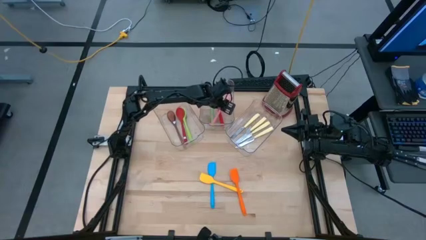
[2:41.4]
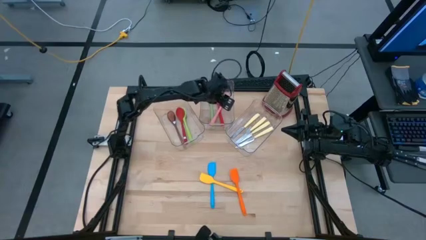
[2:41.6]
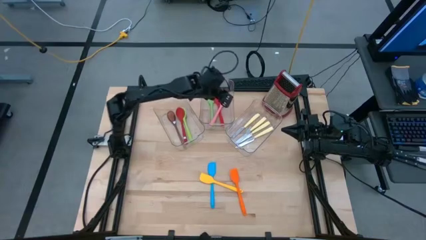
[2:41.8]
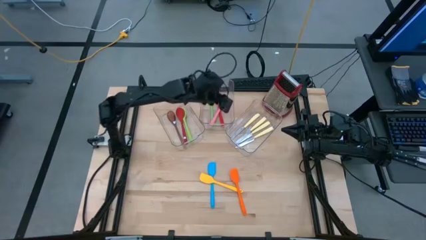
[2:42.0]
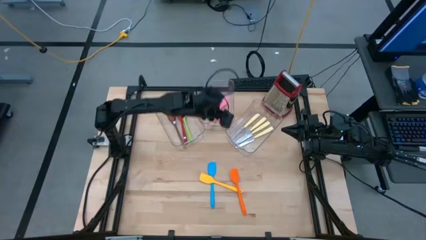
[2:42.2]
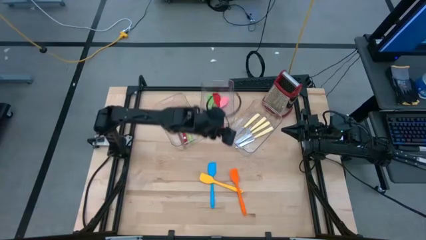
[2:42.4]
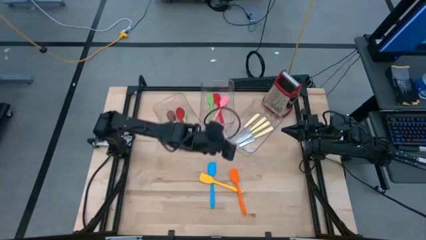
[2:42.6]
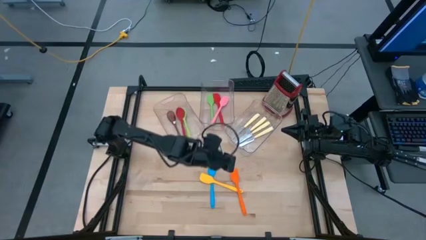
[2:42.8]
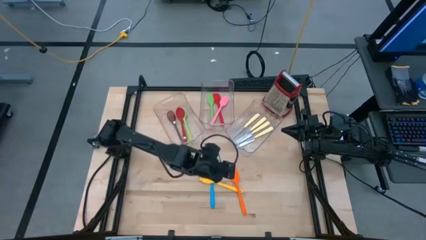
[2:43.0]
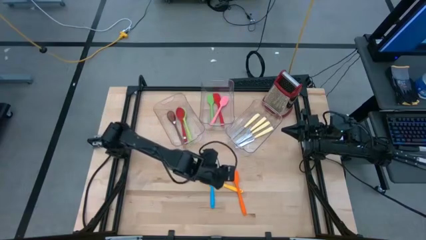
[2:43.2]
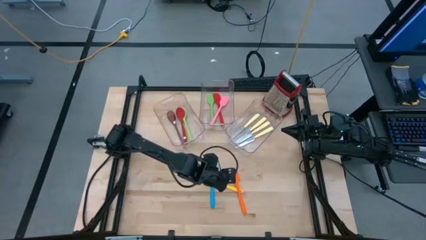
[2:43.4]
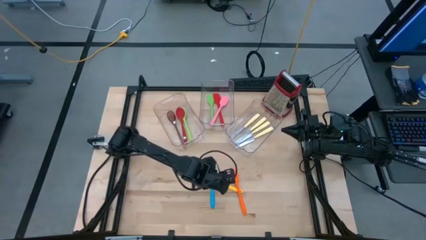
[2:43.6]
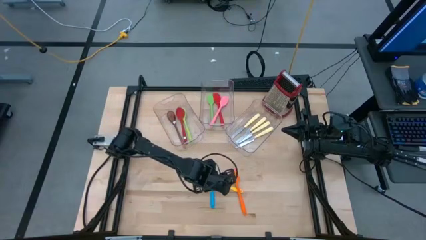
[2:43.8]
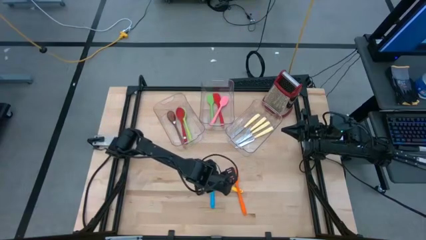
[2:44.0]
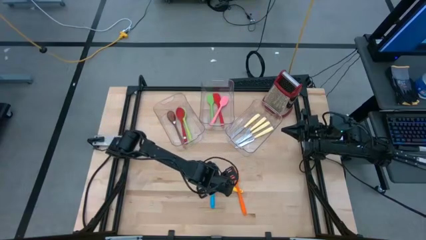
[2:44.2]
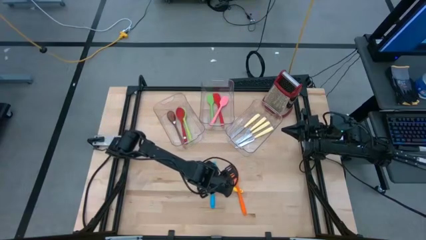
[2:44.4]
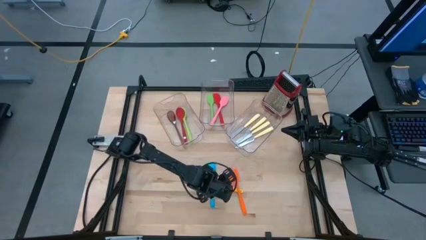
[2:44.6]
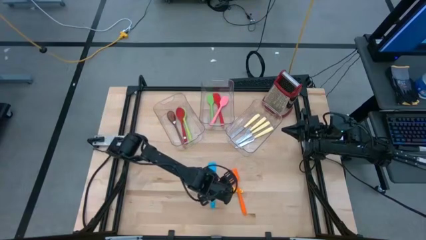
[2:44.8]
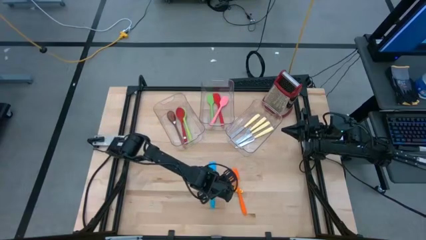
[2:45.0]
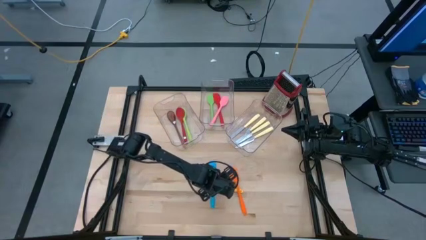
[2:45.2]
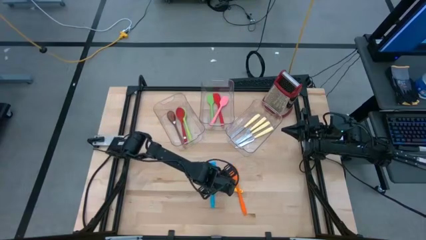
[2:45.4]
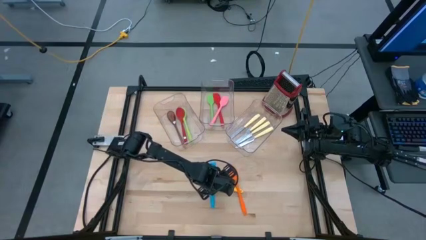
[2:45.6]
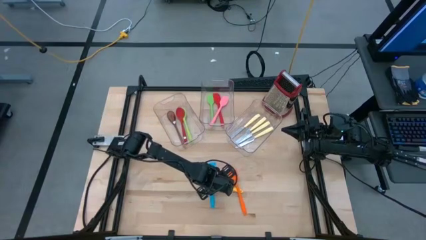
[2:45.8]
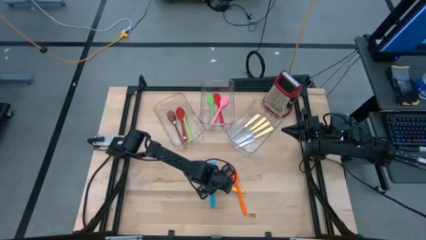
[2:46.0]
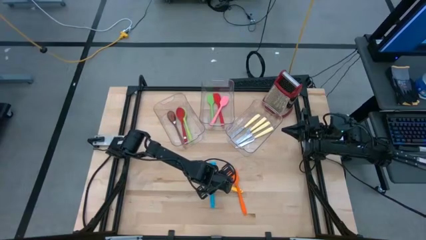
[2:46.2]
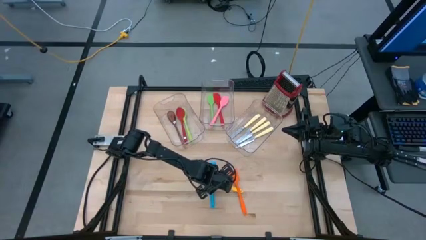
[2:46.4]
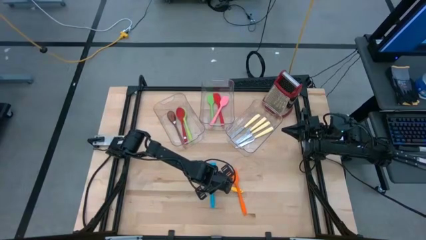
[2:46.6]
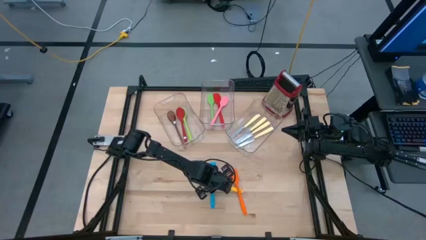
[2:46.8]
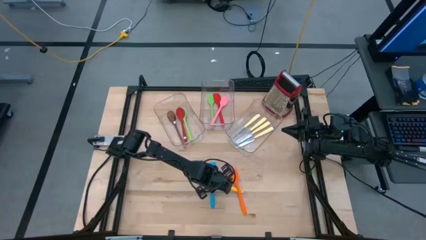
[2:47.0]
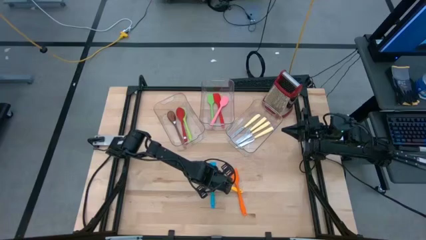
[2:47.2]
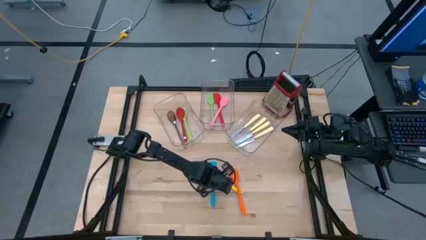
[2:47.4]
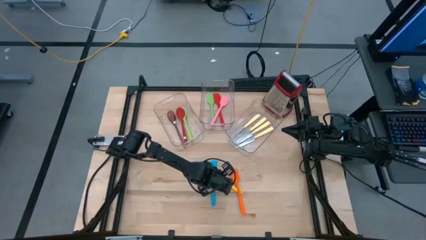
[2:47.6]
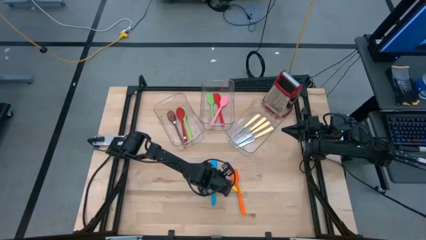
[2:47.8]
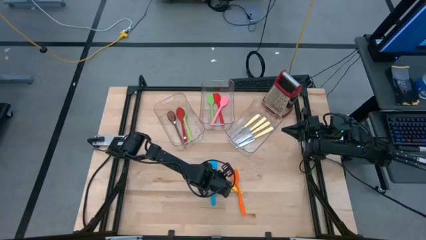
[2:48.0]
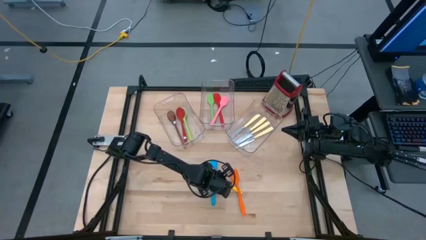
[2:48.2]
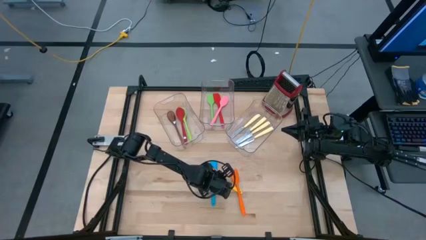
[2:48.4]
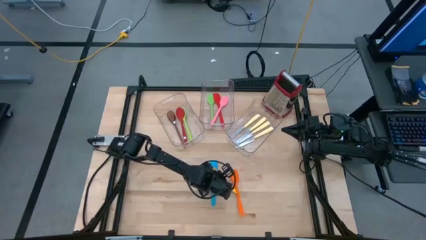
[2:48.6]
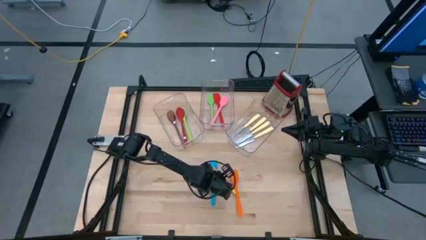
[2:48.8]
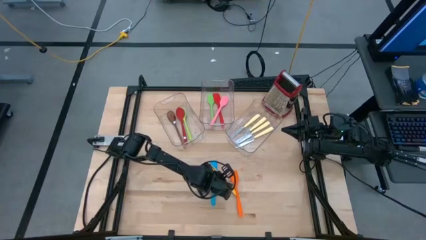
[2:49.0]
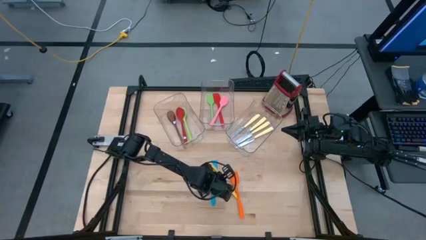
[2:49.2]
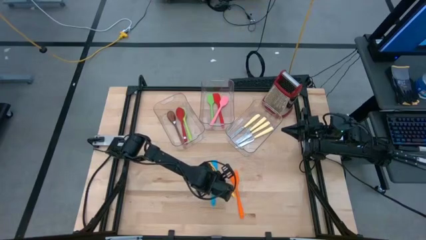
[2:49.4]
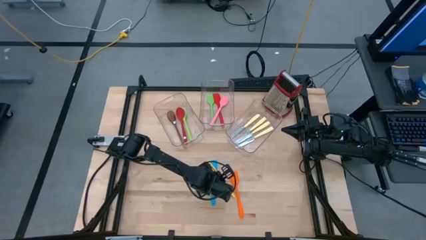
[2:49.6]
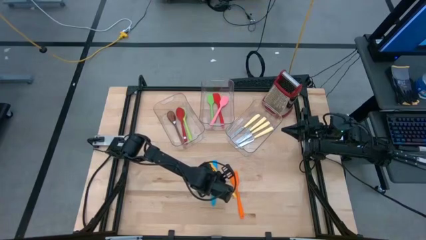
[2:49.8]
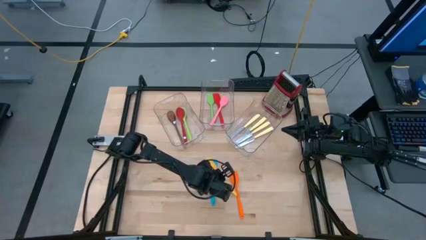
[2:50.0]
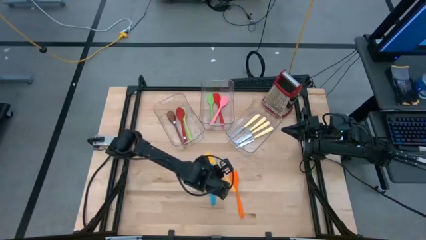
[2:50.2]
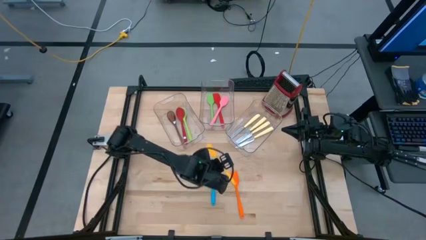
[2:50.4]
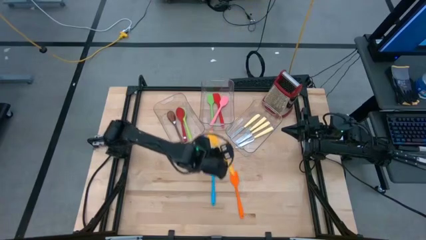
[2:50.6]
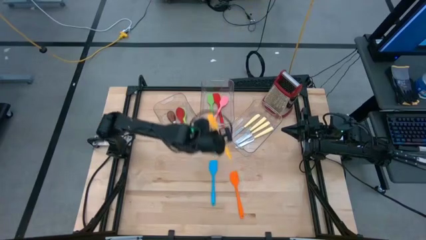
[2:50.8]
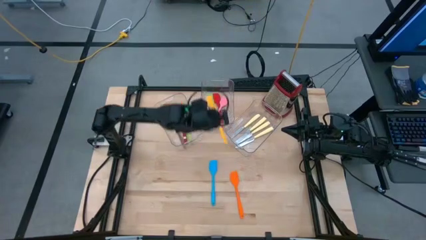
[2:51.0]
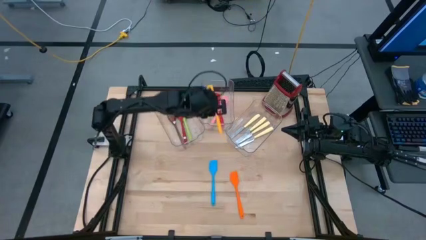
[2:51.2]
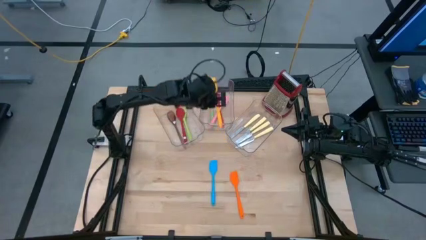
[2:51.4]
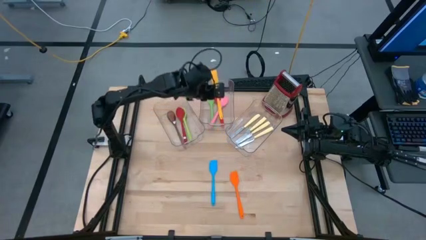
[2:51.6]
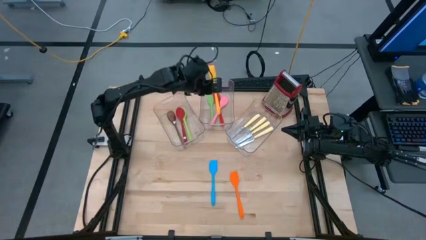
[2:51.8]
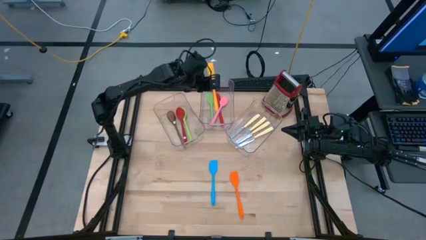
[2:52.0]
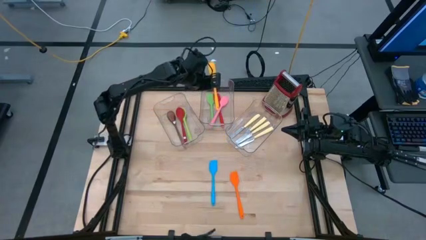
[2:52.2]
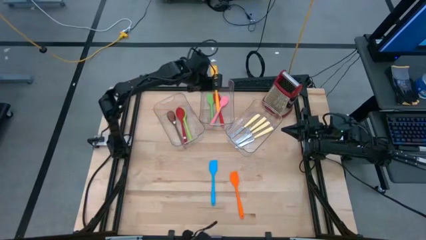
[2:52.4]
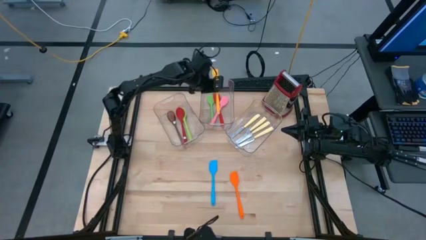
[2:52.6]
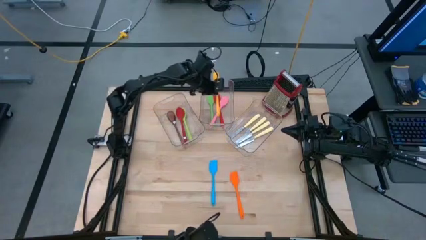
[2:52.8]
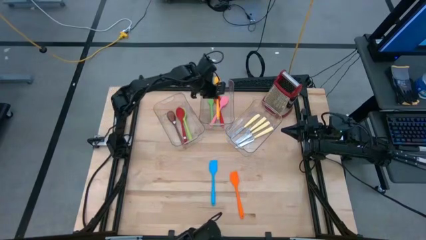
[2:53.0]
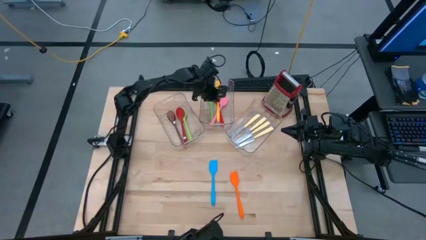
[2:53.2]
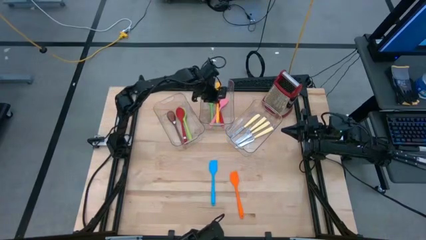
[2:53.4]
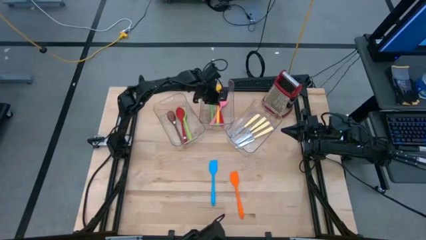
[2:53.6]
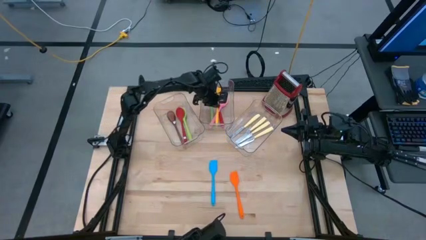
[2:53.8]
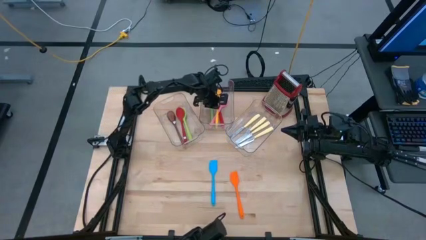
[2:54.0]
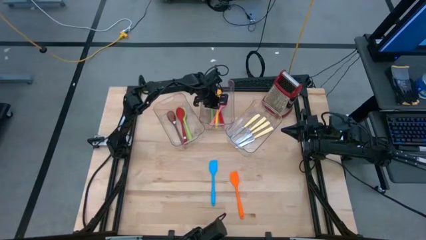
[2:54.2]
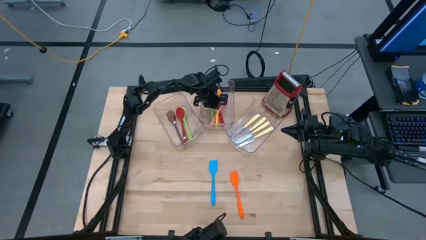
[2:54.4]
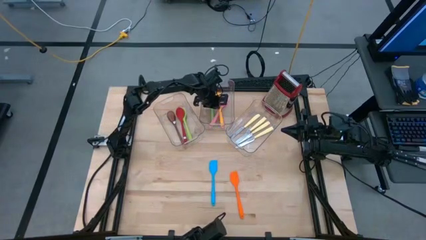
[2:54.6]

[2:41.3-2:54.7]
Task: Pick & Place Kitchen Items
Put the yellow spatula into the middle transparent bin

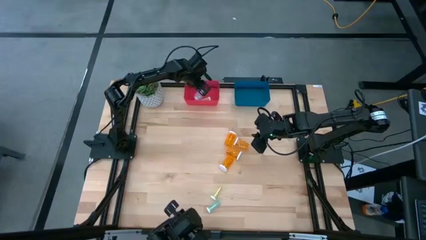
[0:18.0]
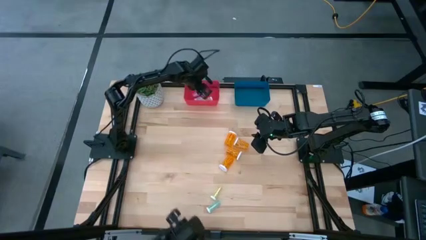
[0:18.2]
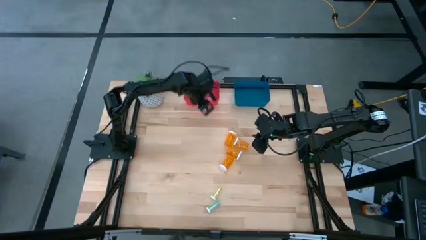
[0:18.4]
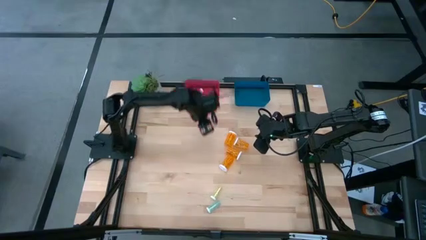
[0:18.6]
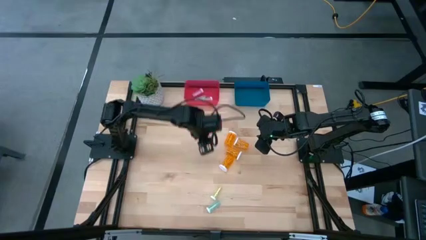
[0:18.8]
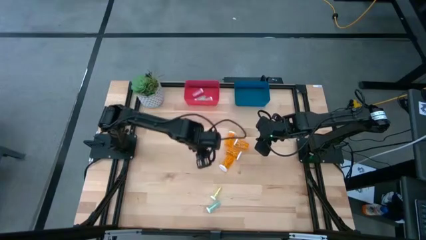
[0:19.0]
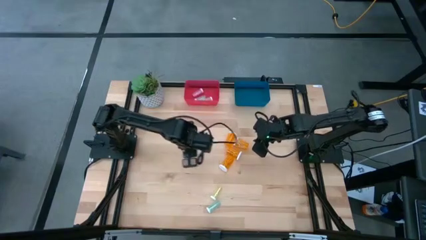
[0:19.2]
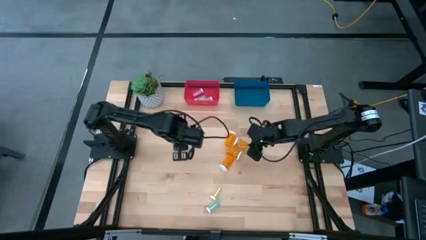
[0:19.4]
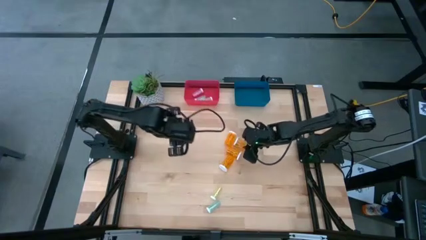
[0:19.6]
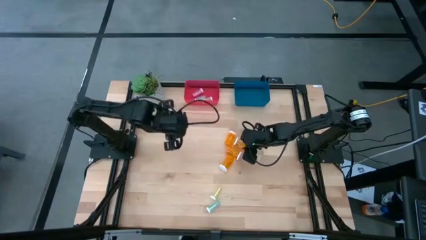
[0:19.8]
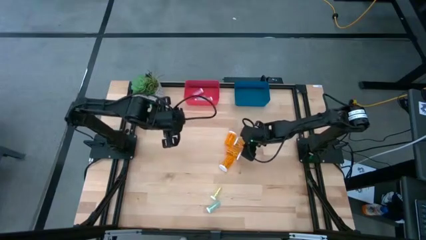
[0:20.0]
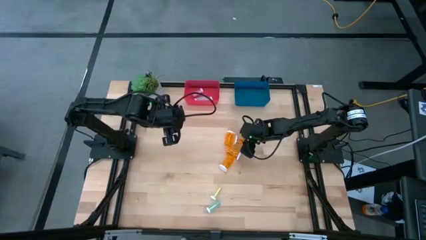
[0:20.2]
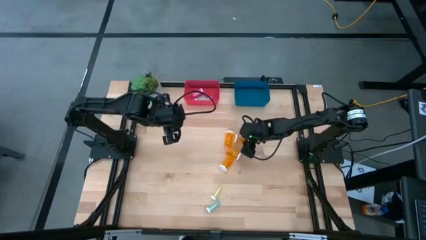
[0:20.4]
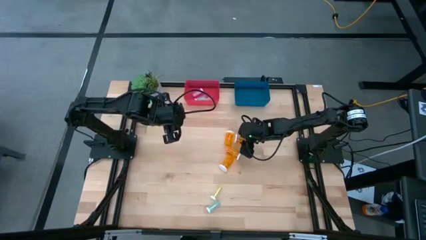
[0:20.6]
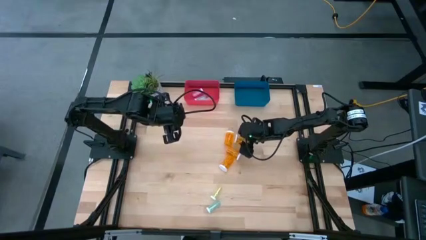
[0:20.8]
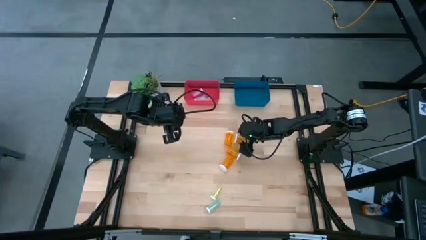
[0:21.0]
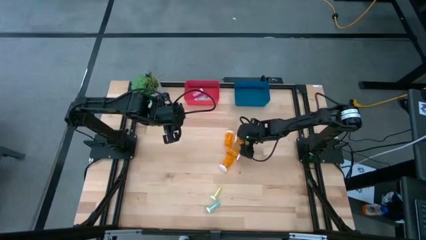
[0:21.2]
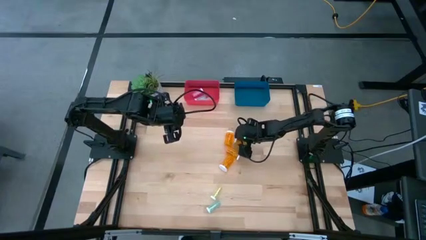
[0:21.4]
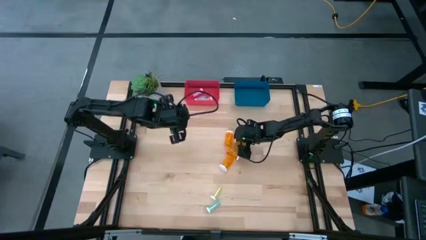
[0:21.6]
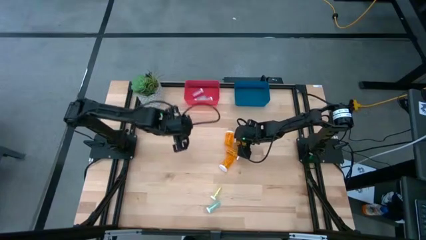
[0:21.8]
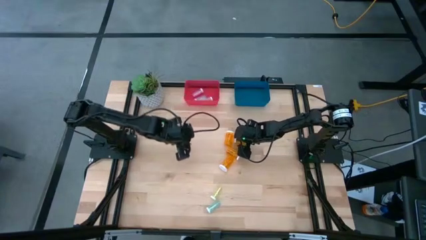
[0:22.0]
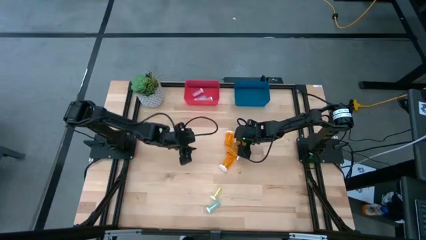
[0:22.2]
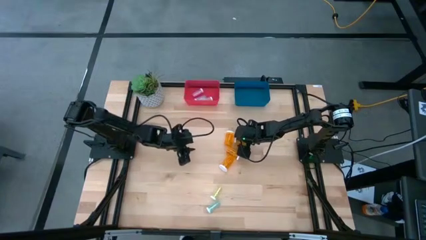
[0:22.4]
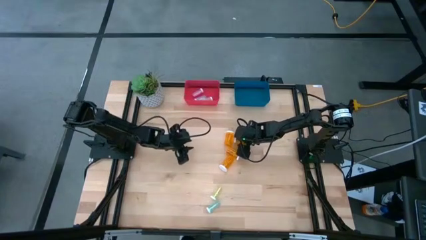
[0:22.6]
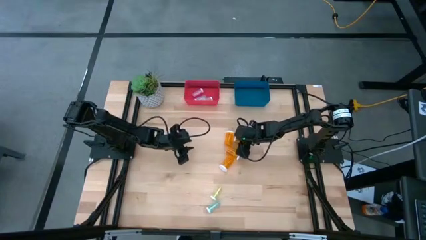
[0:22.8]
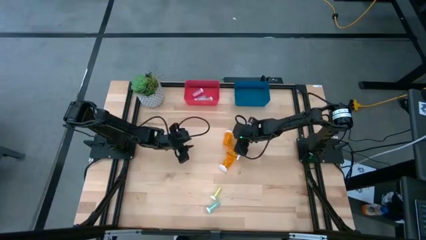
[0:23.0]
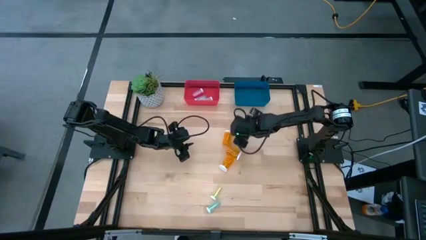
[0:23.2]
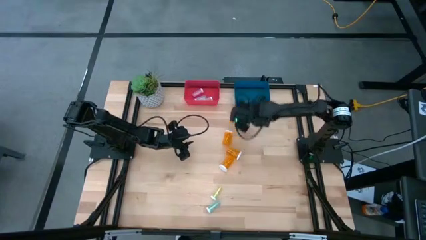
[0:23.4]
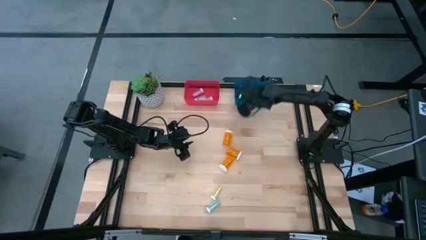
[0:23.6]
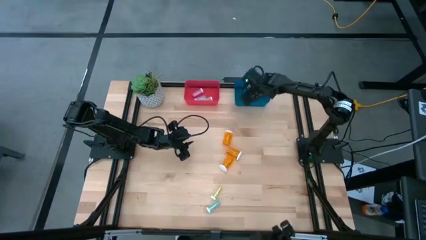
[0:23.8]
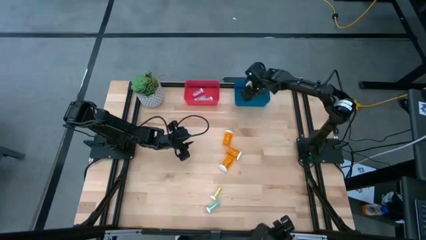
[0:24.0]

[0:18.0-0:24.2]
Task: Pick and place medicine bottles into bin by pill shape (circle, oval)
Put the orange pill bottle into the blue bin
